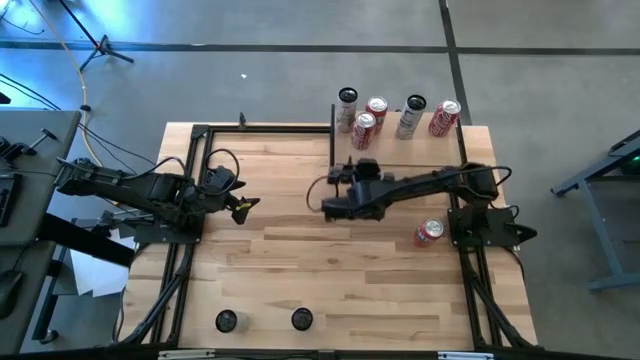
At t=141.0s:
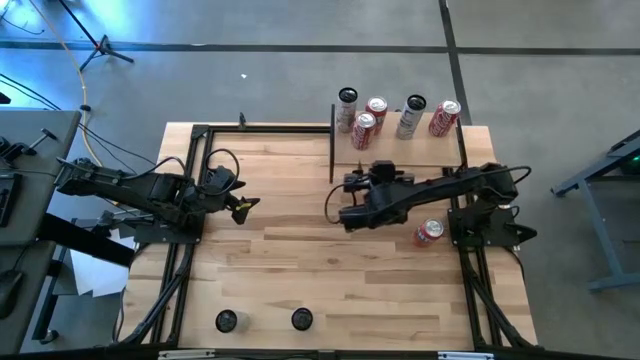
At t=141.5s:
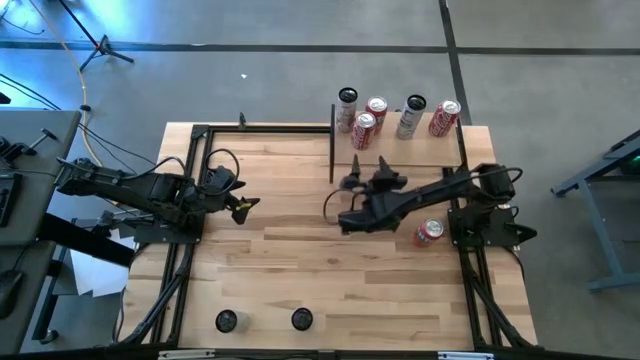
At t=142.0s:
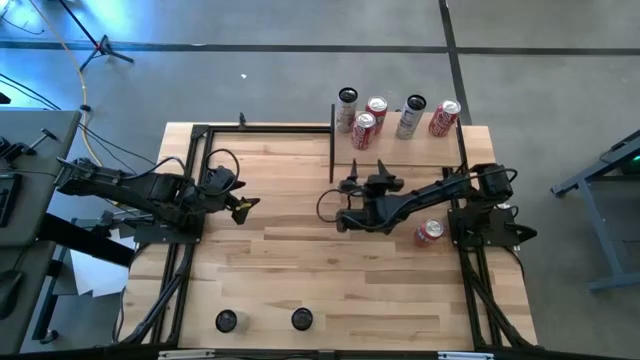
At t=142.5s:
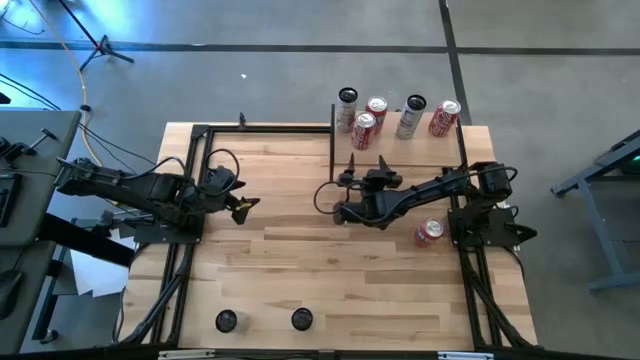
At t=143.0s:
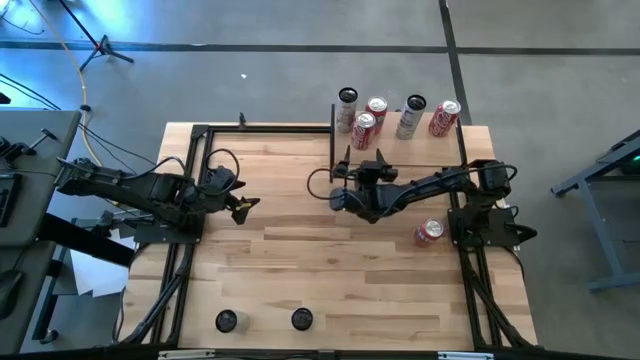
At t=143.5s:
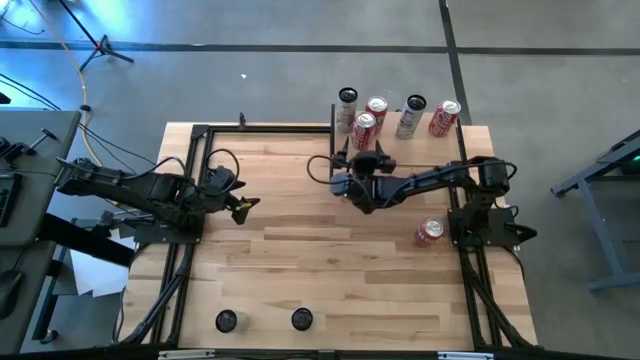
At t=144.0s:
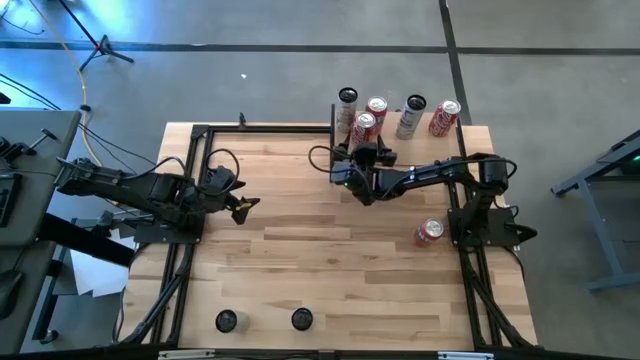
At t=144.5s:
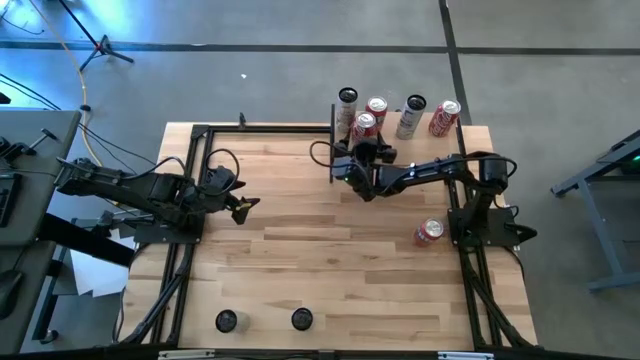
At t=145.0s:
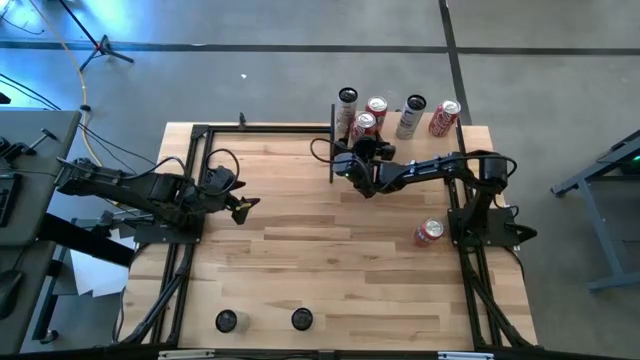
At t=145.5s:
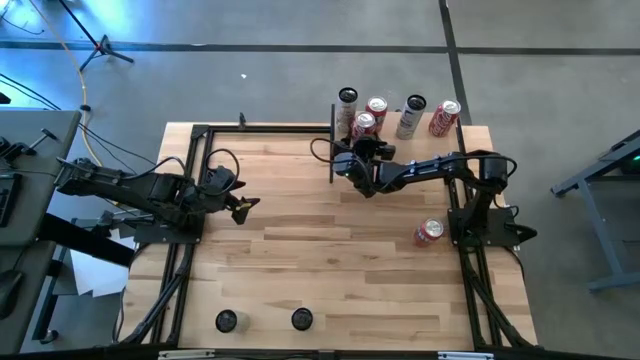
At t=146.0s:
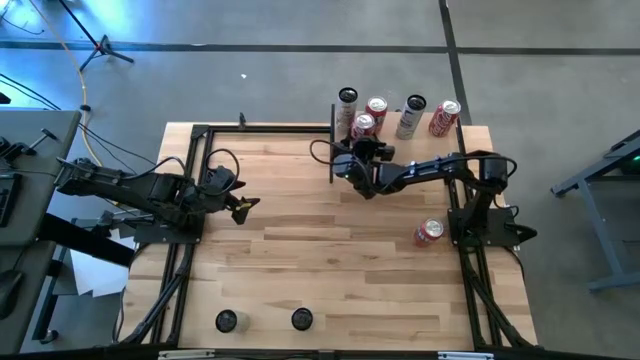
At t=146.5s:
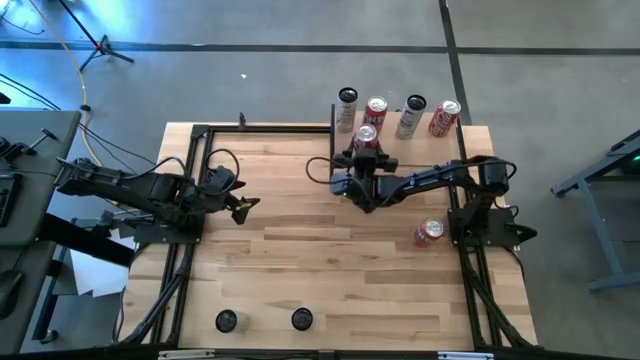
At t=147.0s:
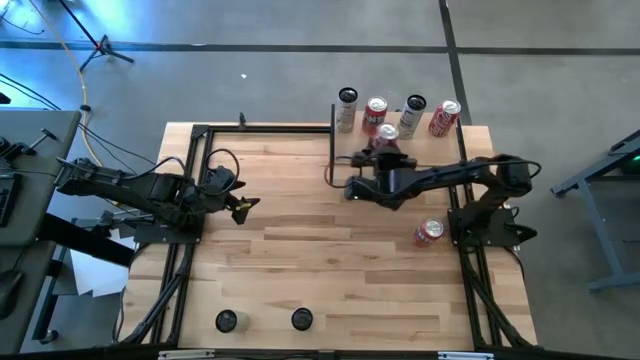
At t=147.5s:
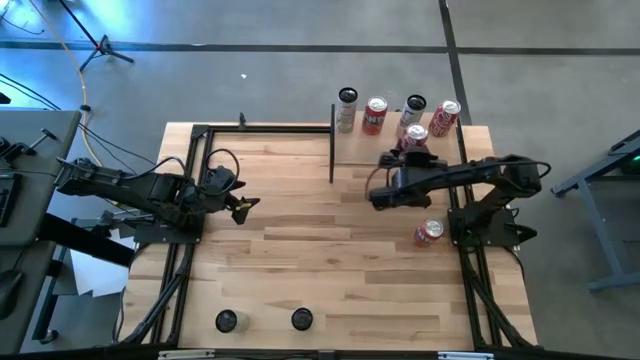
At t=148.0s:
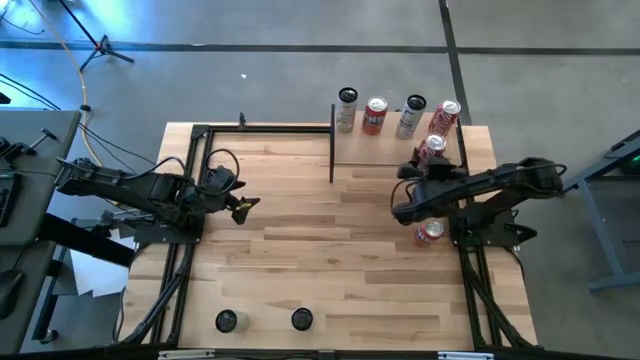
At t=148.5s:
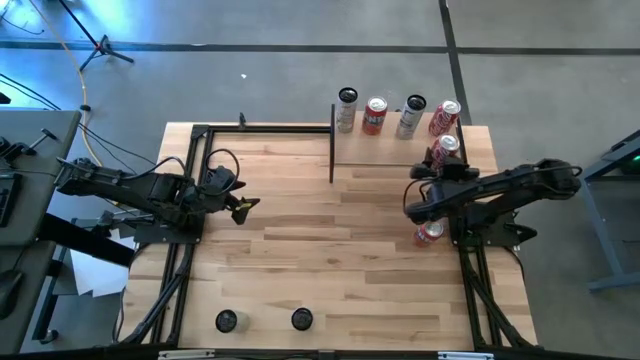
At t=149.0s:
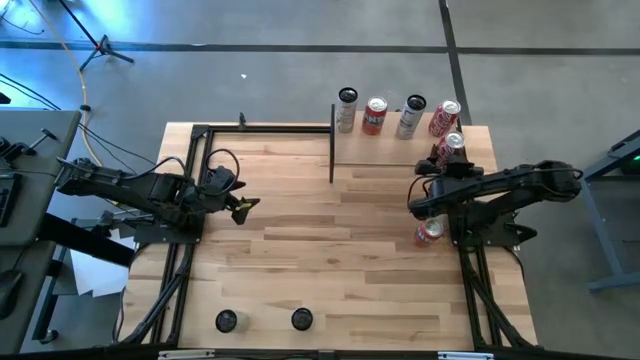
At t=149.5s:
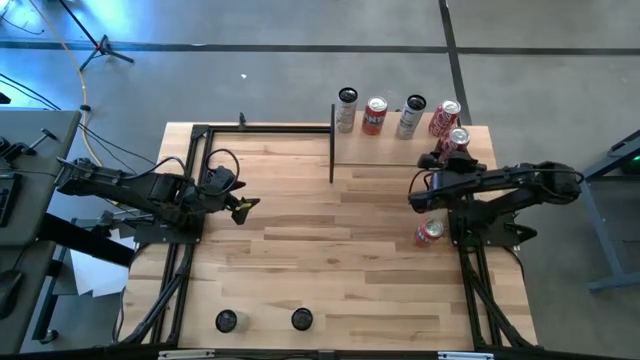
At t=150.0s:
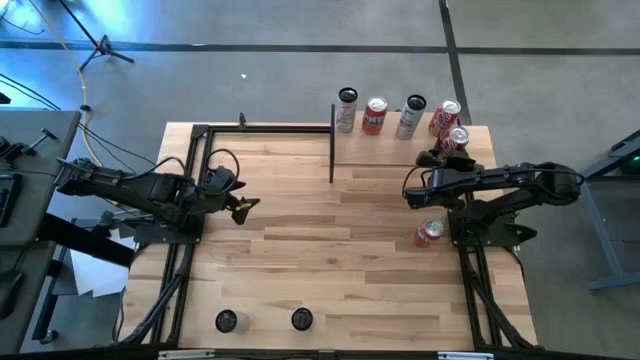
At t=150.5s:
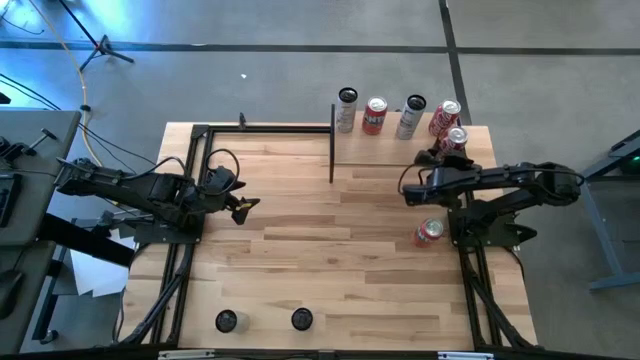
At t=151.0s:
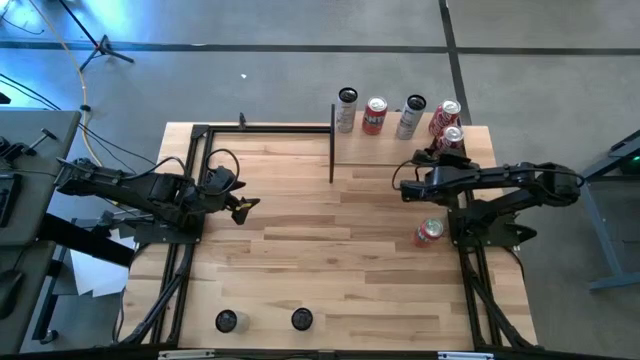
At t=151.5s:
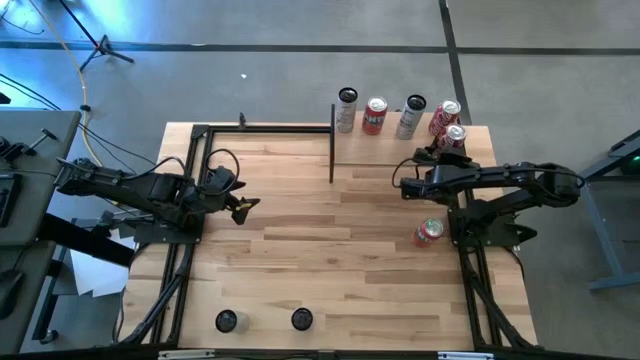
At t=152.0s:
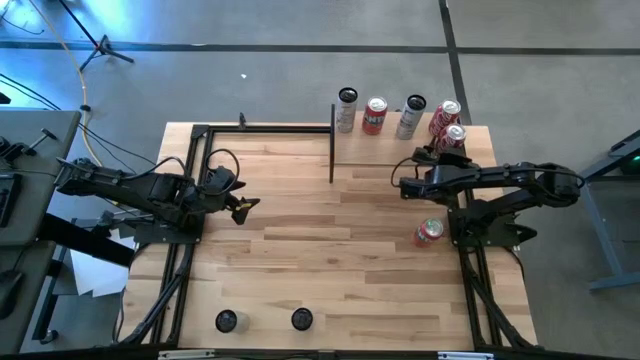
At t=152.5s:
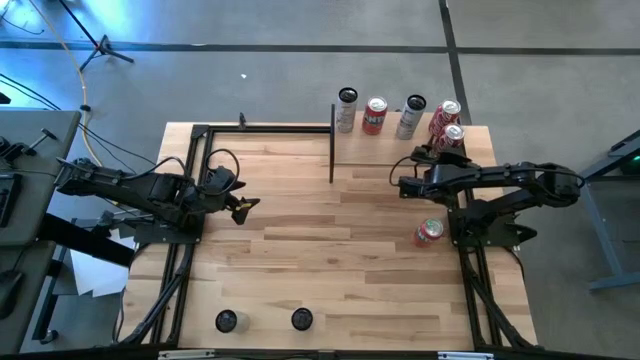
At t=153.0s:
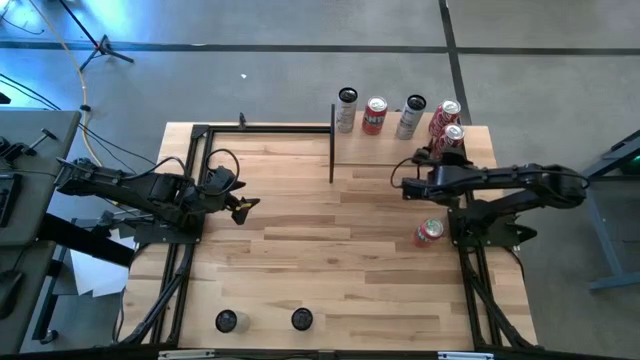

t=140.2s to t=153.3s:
Task: Place canned beverage on shelf
Put the red white soda can on the shelf aligned with the other red white soda can

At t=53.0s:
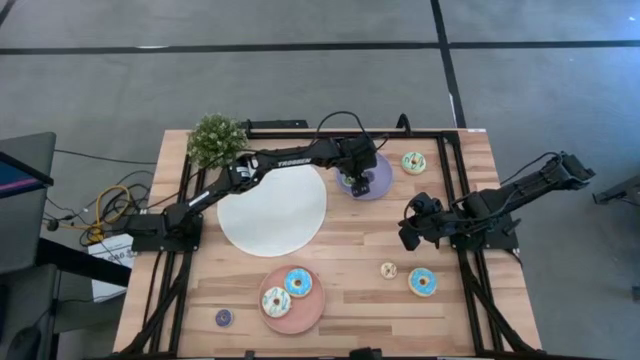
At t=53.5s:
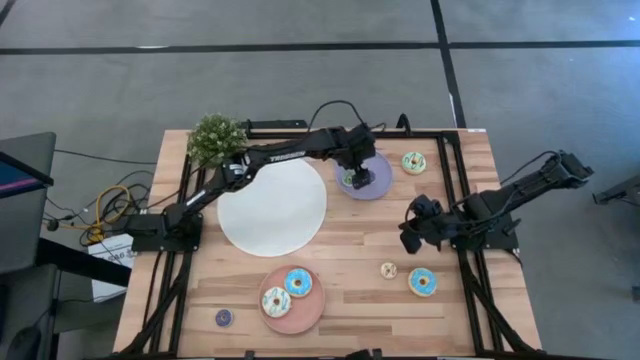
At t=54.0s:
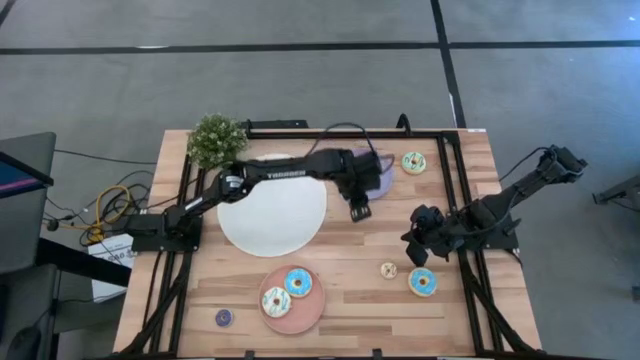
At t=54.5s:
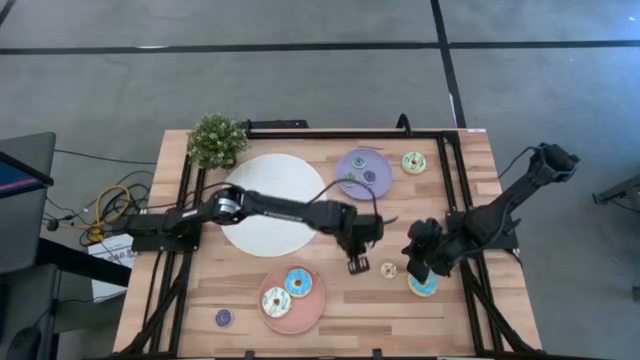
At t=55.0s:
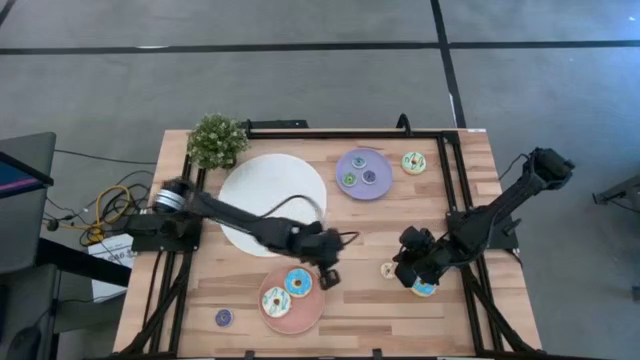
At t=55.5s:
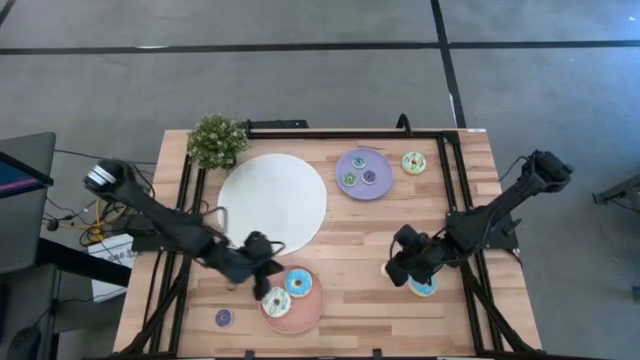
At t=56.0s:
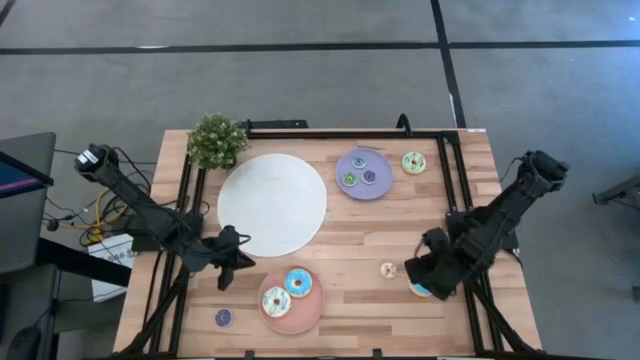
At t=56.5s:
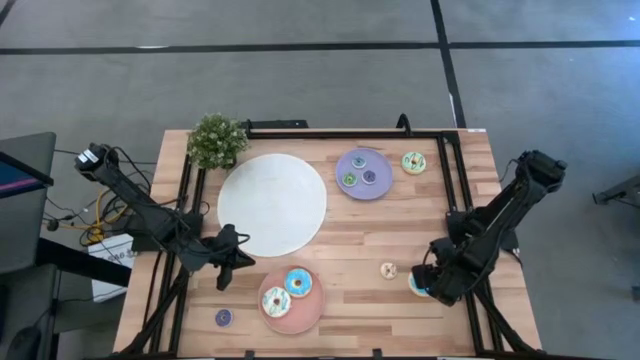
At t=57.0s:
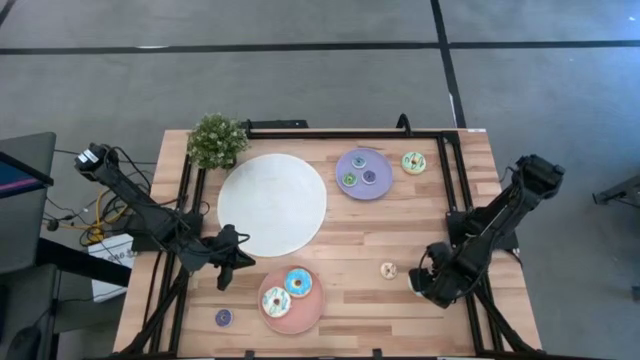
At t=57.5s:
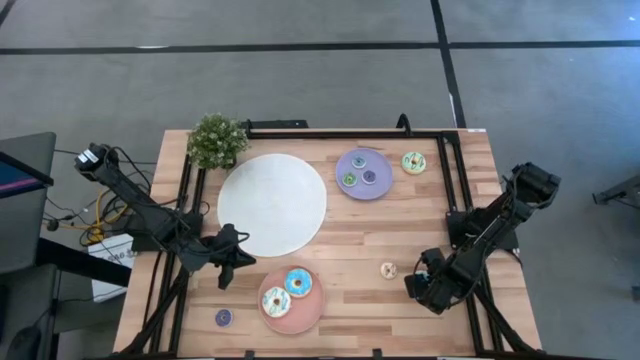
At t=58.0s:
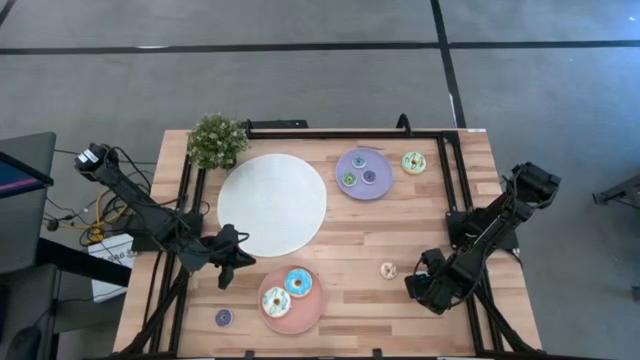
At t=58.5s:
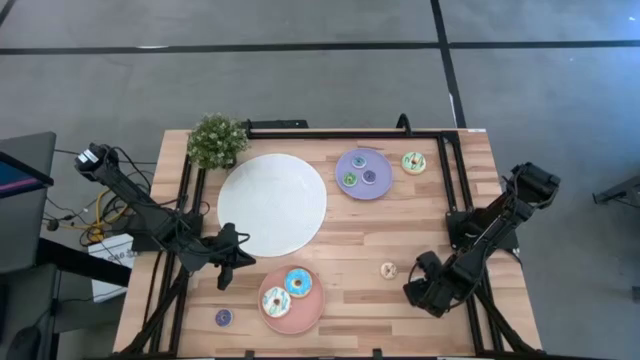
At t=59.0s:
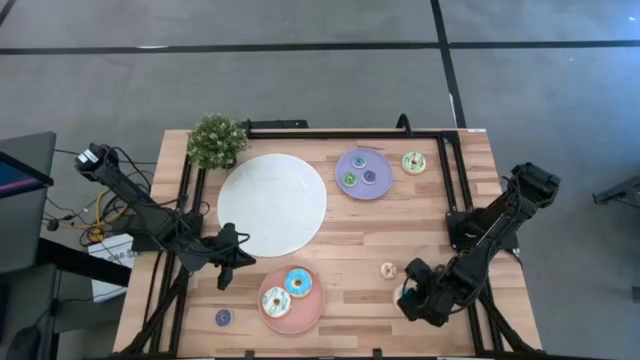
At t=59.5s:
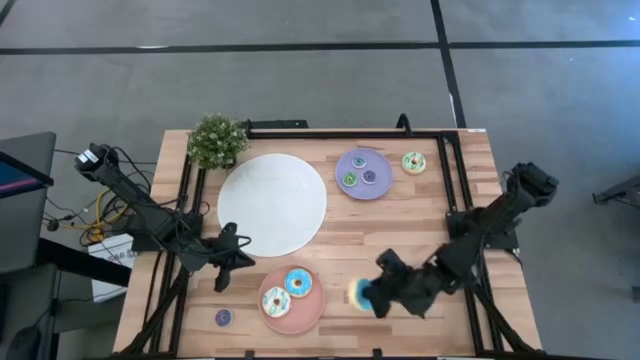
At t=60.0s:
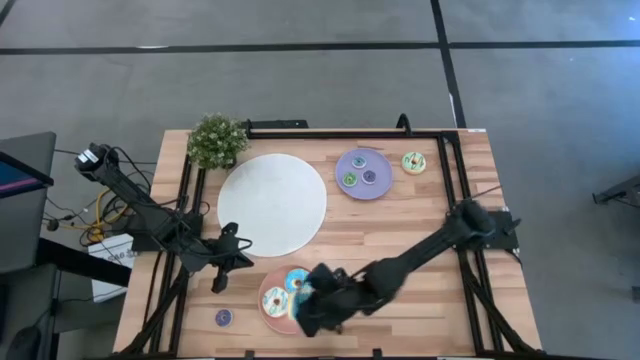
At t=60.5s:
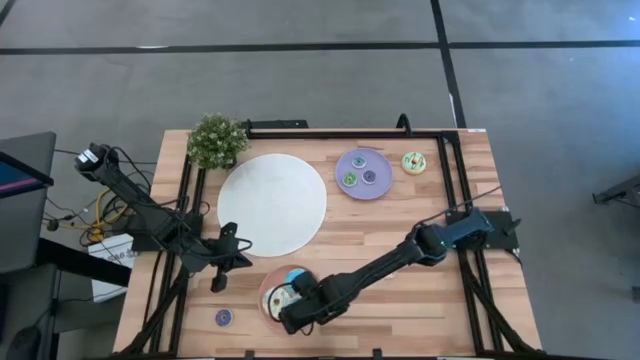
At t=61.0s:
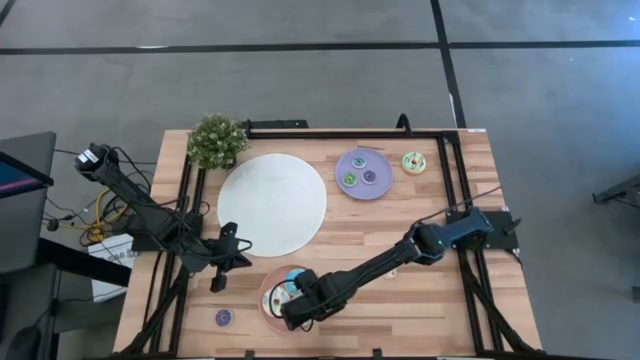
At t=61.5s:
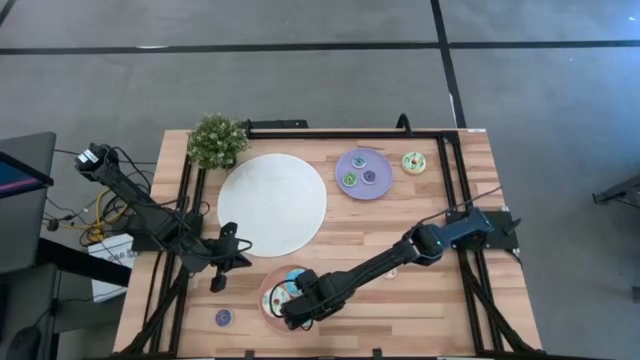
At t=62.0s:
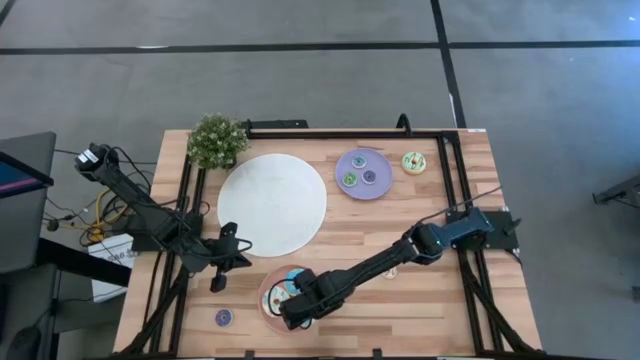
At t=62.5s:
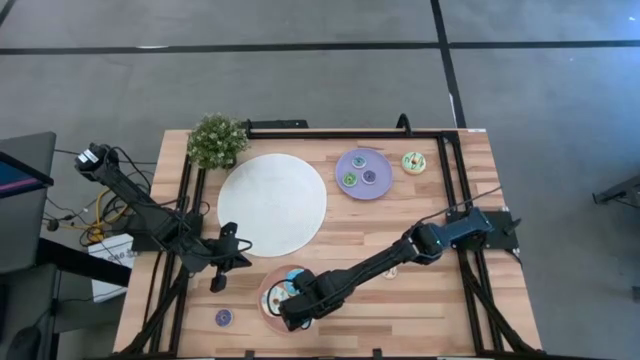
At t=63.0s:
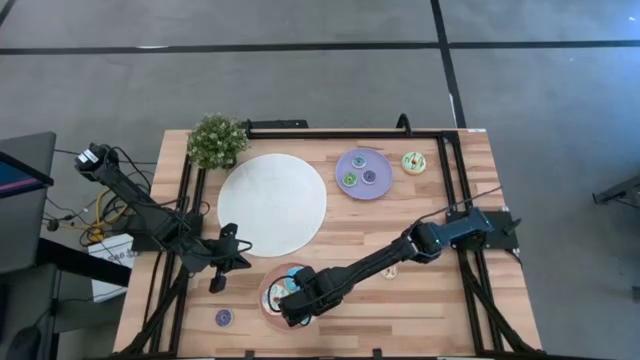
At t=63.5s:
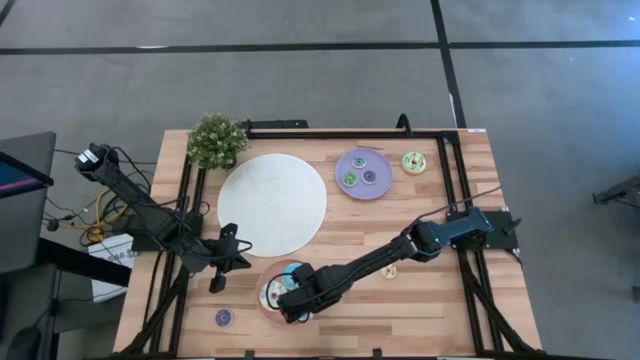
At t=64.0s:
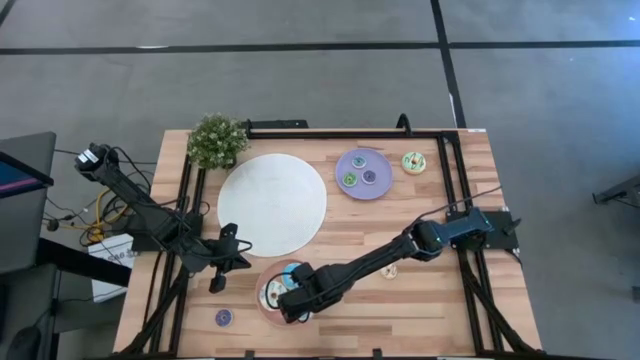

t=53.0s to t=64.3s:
Task: Pick & Place donuts
Put the large blue donut on the pink plate
